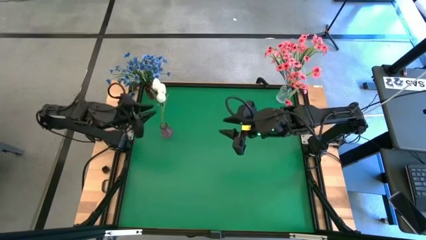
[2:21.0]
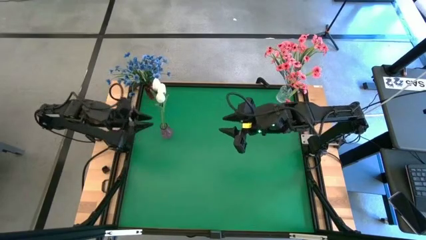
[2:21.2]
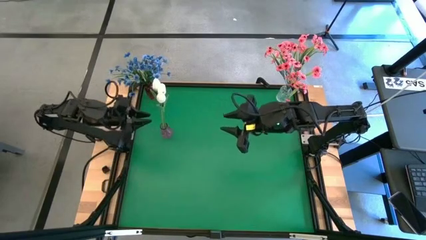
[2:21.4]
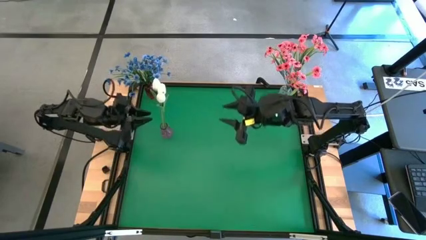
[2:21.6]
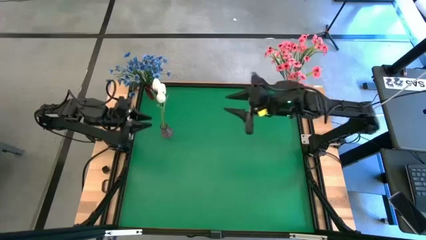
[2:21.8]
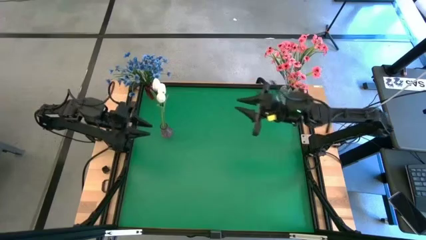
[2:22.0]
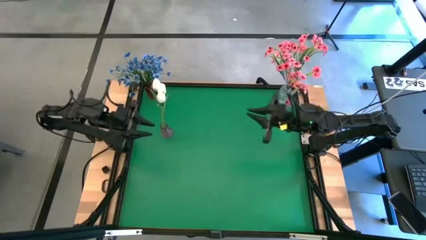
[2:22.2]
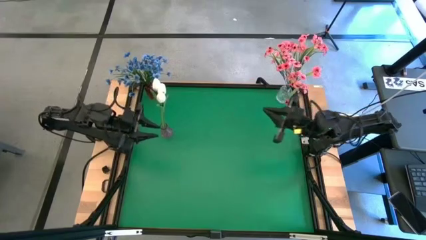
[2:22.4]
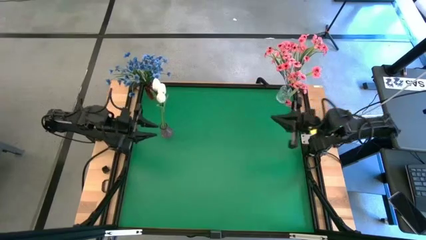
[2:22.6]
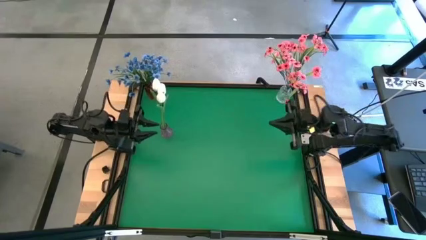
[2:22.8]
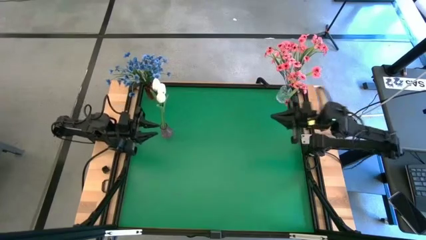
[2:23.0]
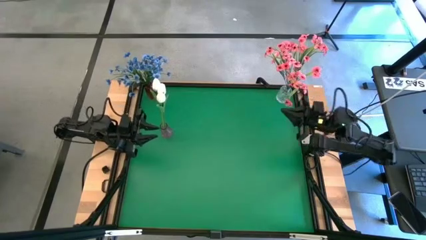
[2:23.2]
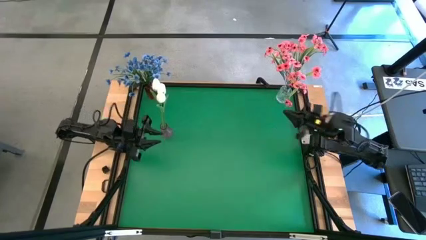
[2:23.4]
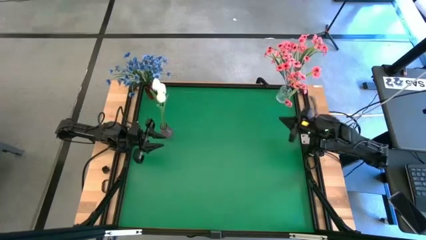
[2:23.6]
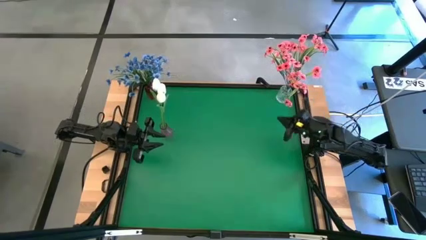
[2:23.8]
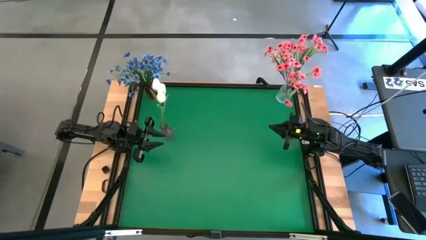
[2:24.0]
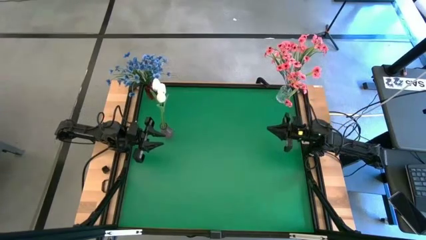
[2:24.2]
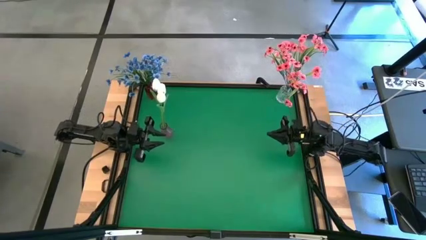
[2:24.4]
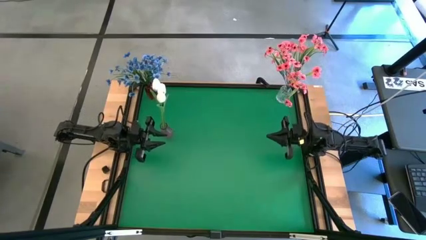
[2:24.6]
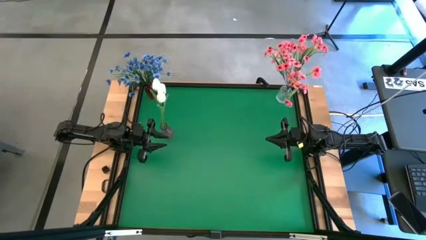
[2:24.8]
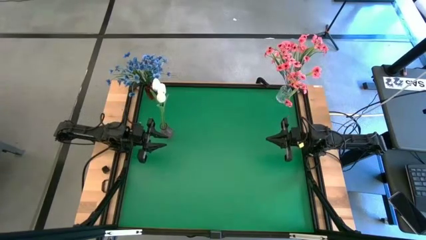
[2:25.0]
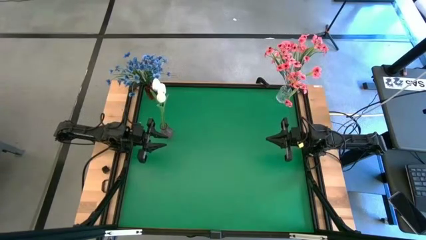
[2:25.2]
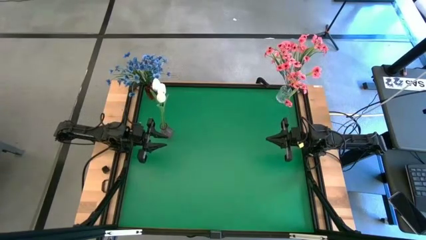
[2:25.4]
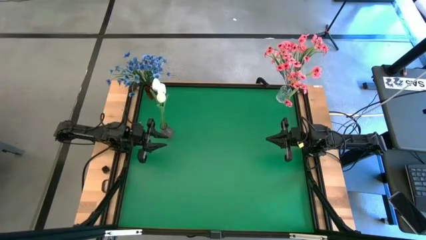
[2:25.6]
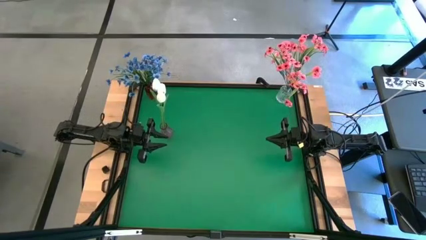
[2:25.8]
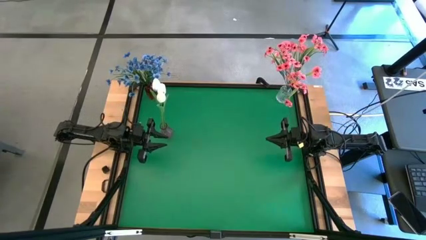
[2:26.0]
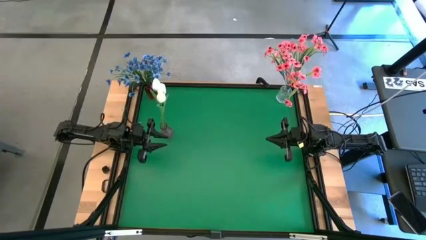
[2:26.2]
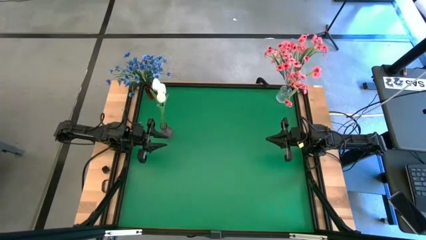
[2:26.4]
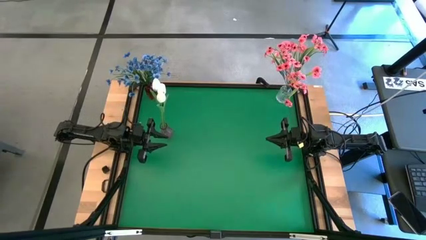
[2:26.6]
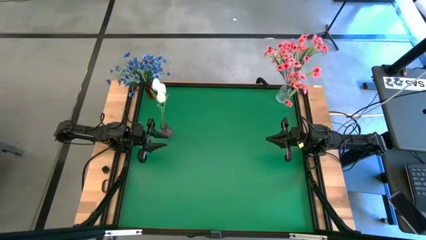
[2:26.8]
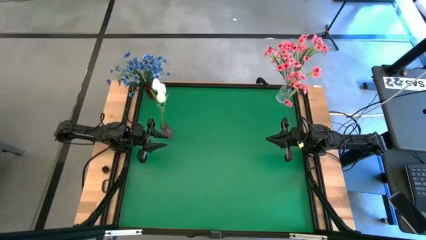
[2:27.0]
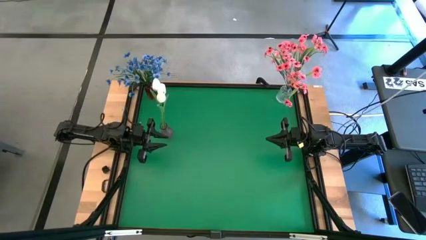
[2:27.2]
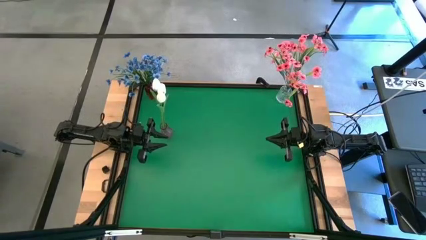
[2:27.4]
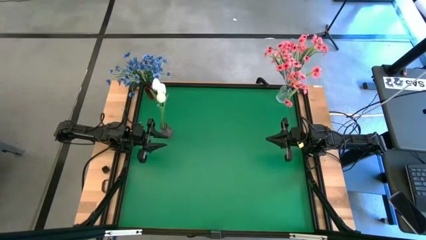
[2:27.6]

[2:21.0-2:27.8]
Task: Sort flowers into vase by color
Return to Home Position

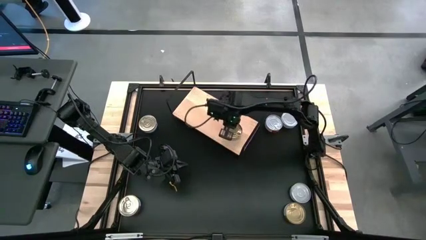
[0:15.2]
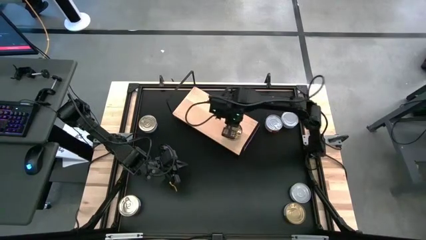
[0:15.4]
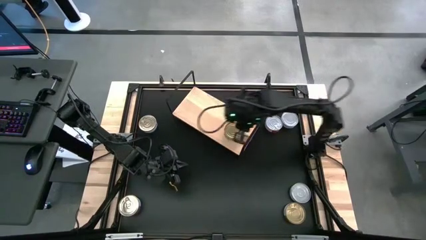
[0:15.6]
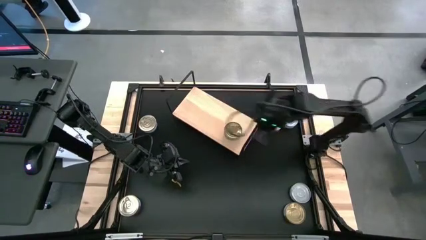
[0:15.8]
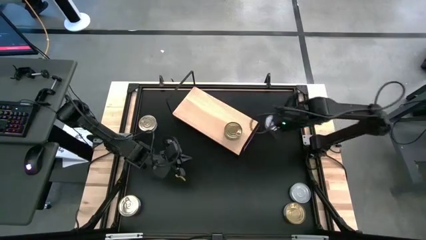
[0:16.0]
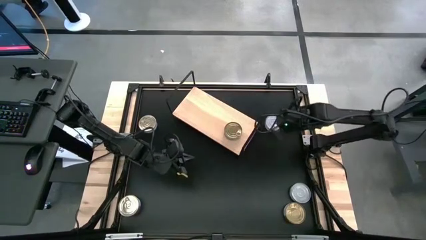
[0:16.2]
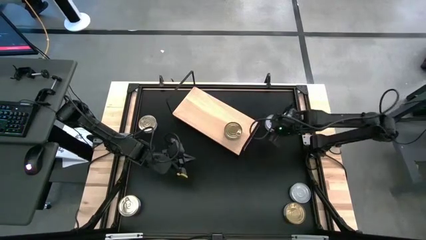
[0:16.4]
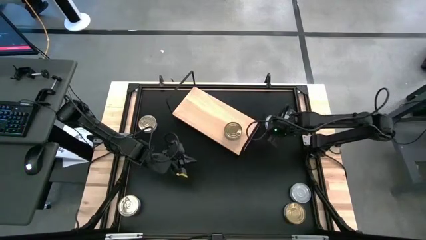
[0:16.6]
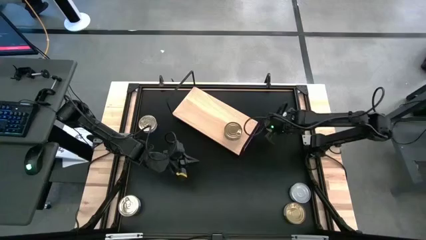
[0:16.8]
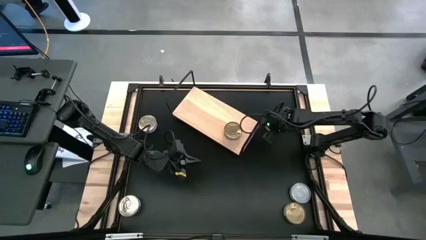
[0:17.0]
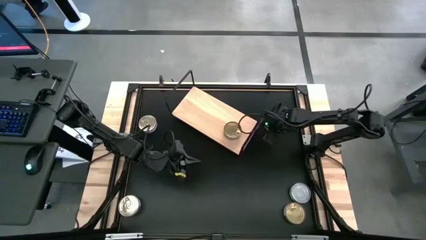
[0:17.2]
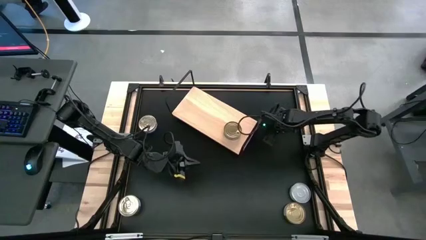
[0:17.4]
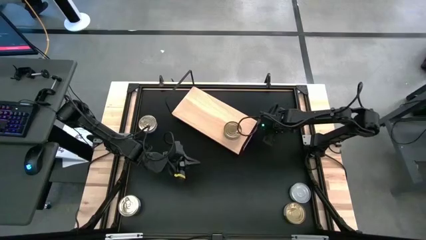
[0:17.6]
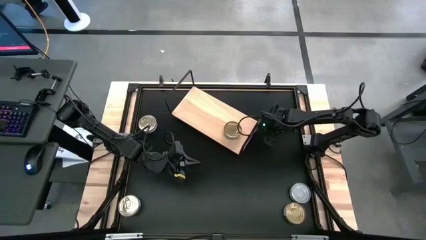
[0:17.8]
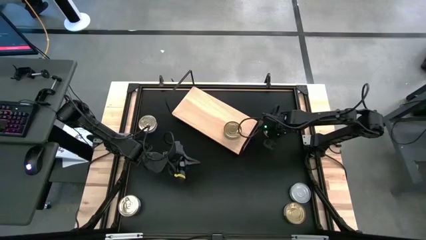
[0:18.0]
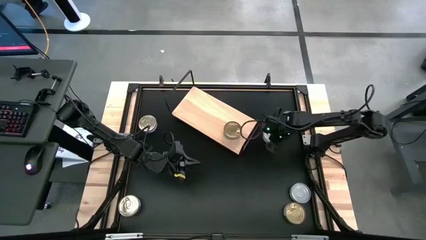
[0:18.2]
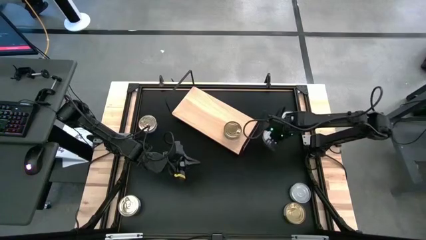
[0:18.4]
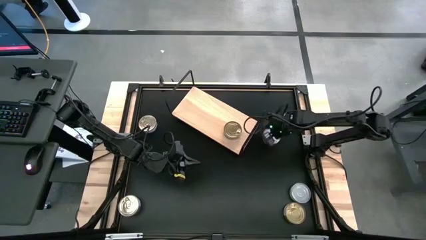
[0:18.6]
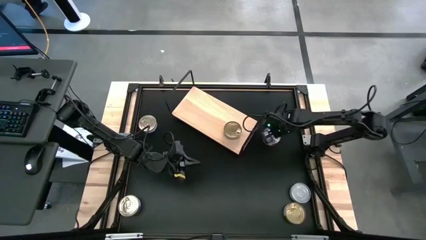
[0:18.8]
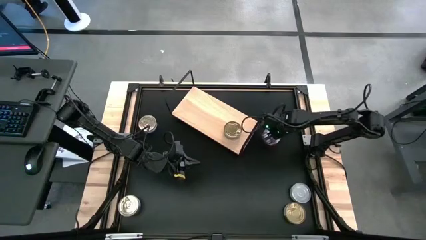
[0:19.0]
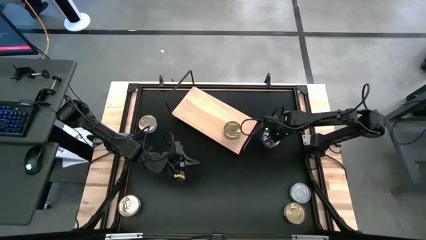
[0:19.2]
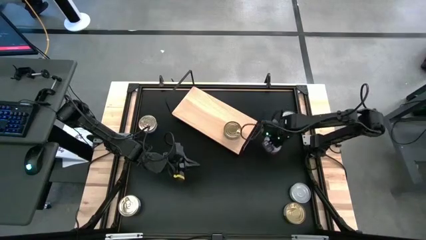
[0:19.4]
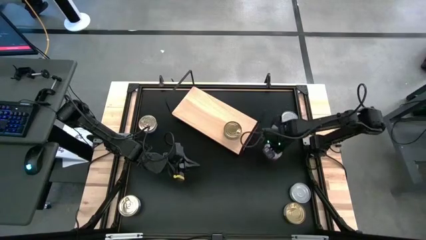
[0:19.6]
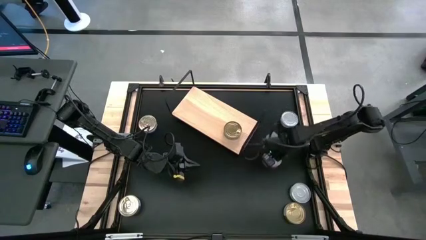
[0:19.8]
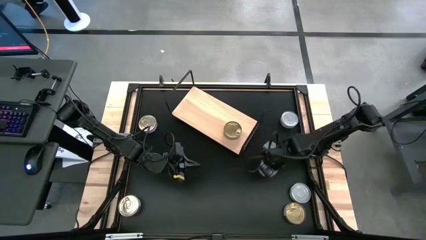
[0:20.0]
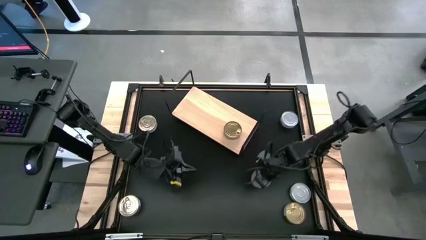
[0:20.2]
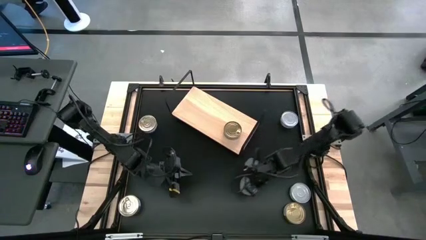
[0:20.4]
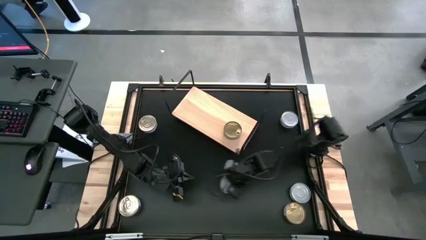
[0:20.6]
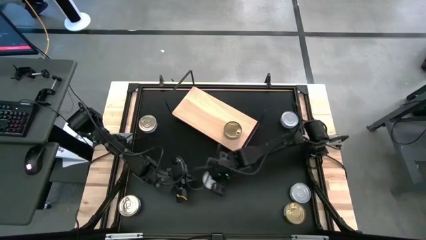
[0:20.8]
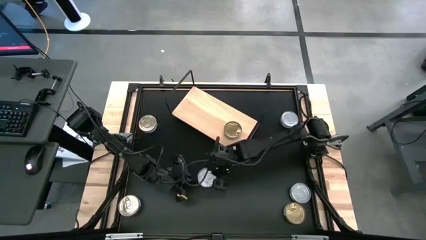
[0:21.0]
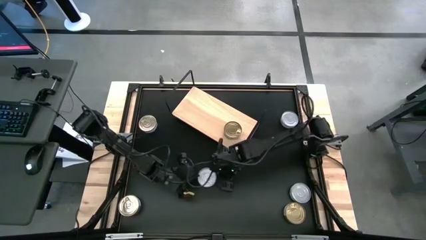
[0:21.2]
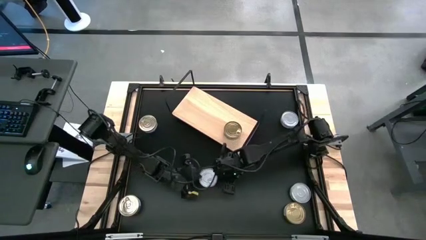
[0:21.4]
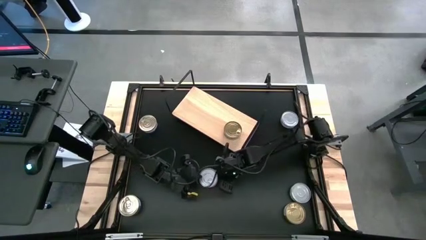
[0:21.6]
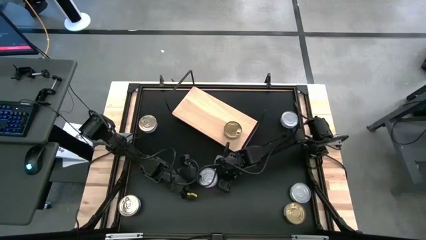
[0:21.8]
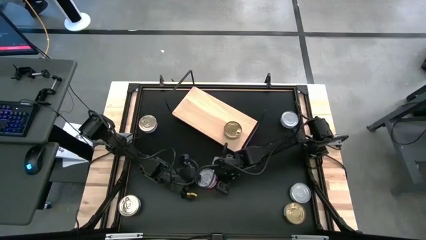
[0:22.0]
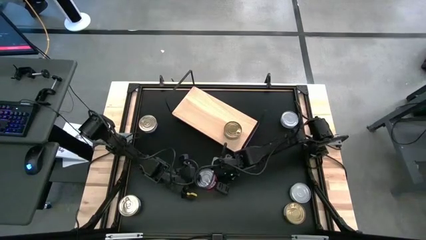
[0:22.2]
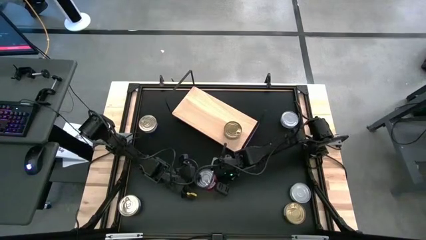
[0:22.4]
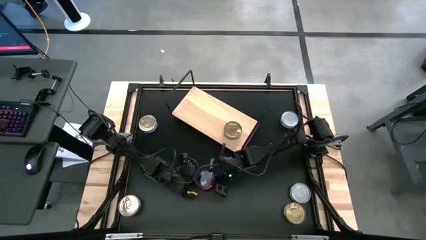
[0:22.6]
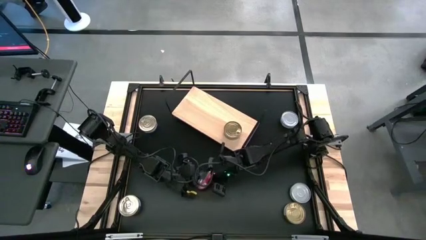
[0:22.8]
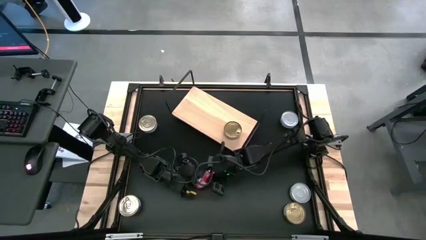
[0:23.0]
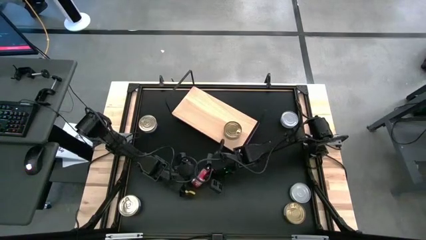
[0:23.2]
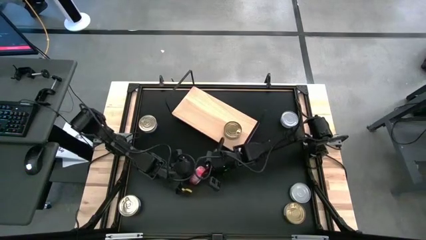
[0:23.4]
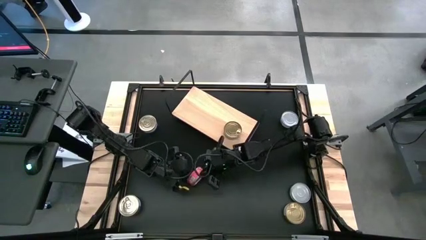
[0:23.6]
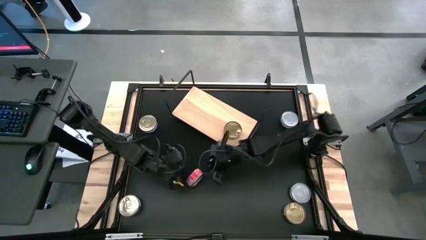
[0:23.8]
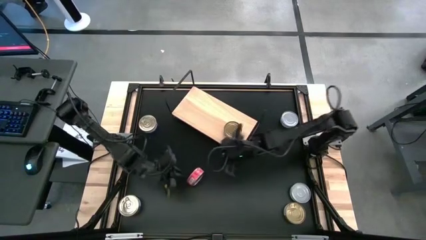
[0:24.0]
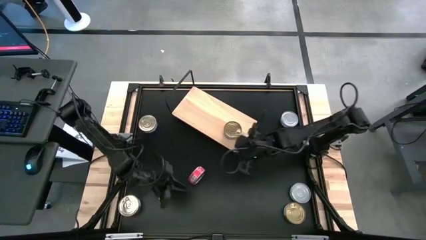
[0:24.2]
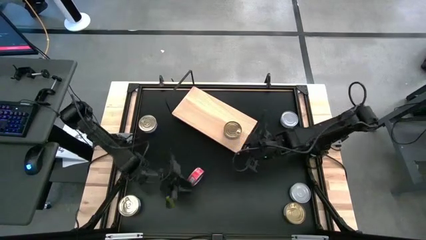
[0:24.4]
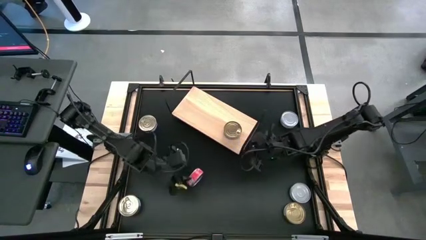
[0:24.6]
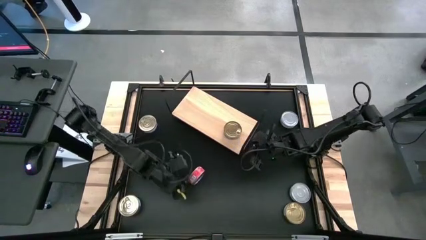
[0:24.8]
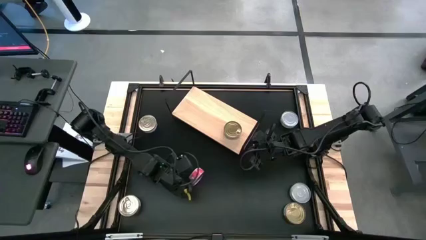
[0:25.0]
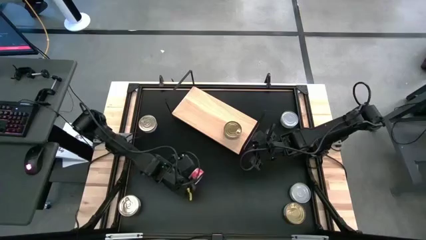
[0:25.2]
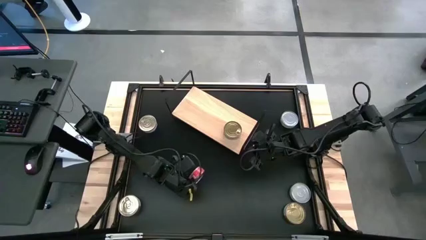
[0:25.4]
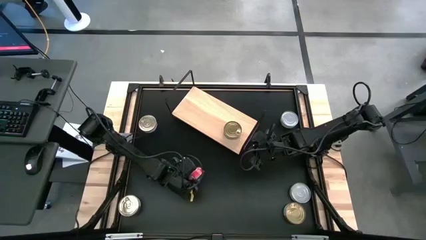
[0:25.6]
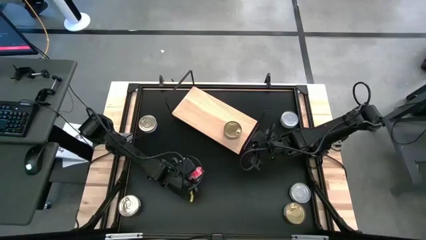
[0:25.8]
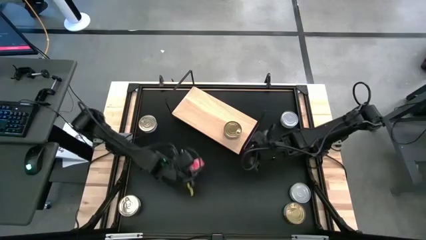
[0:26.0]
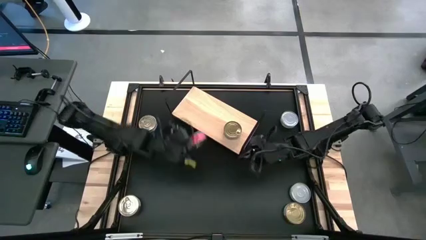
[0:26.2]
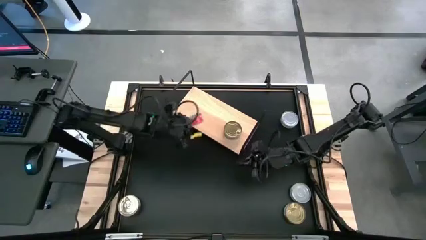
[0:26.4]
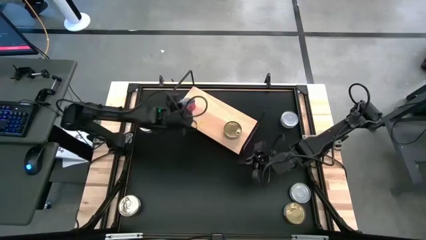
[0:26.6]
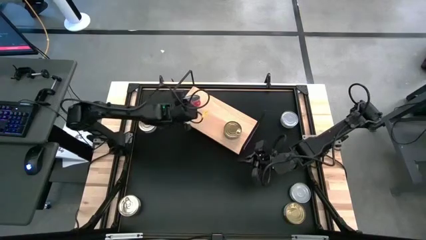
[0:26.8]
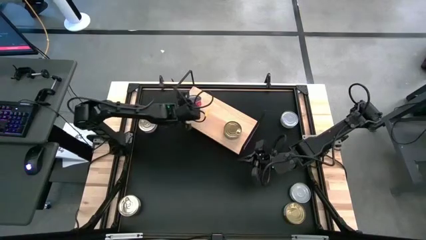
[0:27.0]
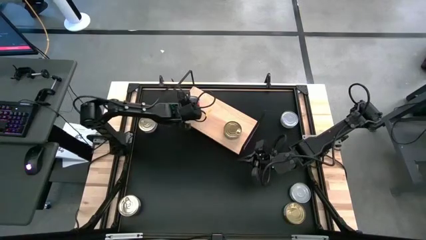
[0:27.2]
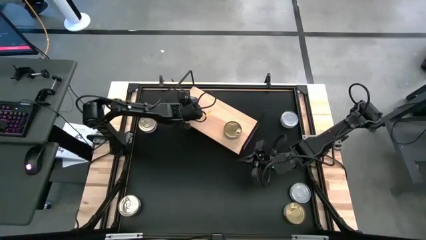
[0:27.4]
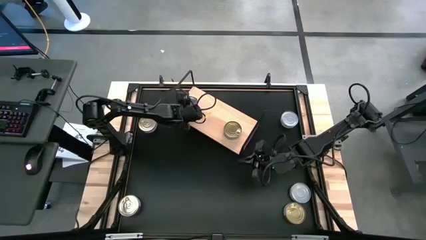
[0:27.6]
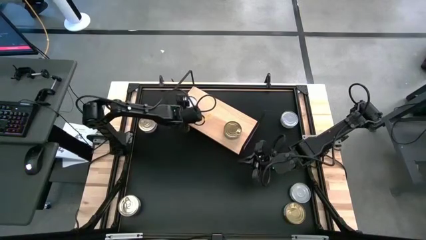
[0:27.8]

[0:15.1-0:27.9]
Task: Stack canned seafood by type on shelf
Put the red tuna can on the shelf
